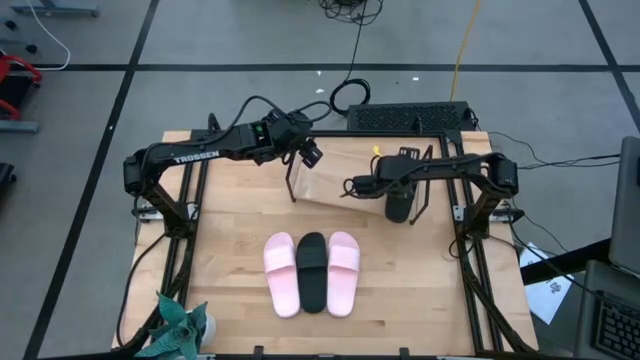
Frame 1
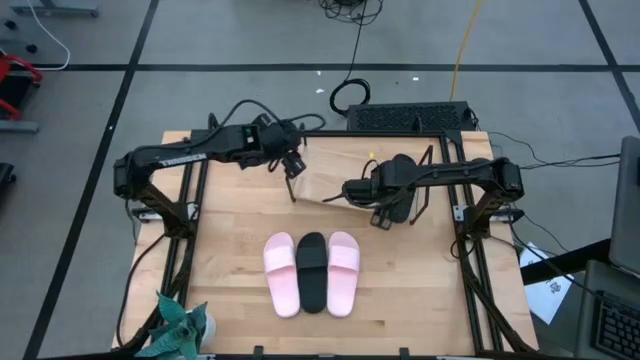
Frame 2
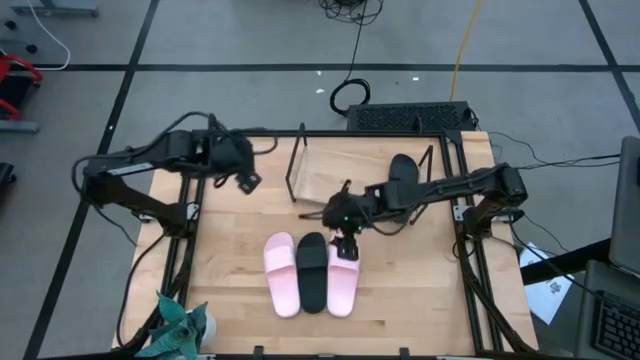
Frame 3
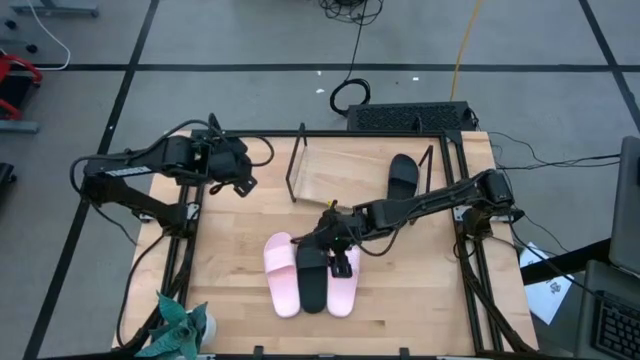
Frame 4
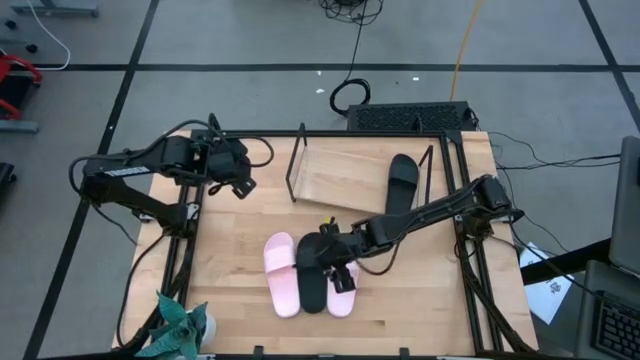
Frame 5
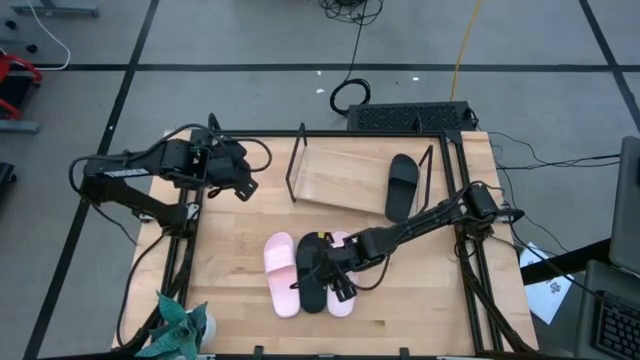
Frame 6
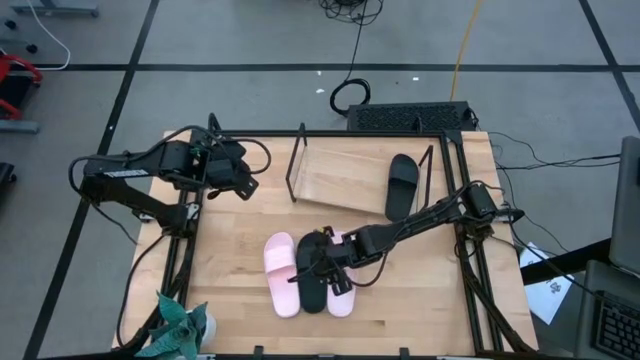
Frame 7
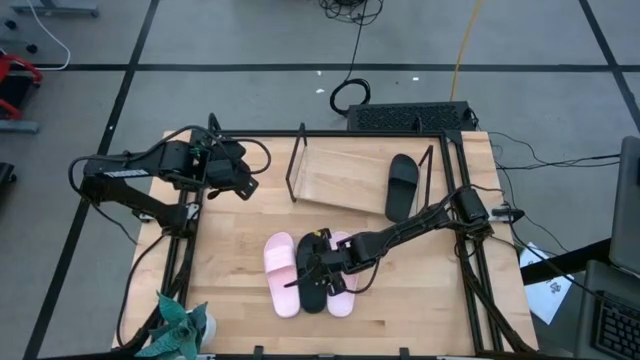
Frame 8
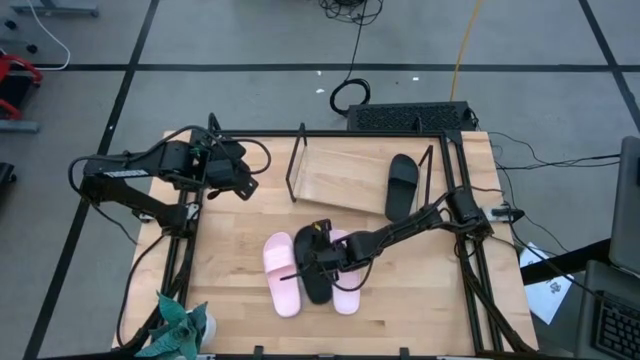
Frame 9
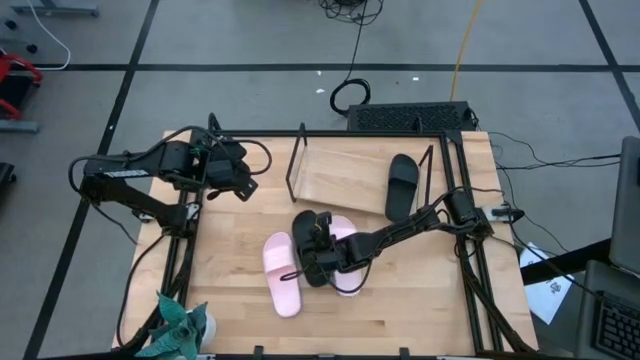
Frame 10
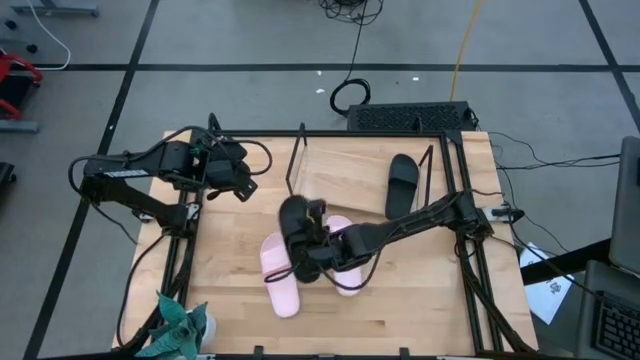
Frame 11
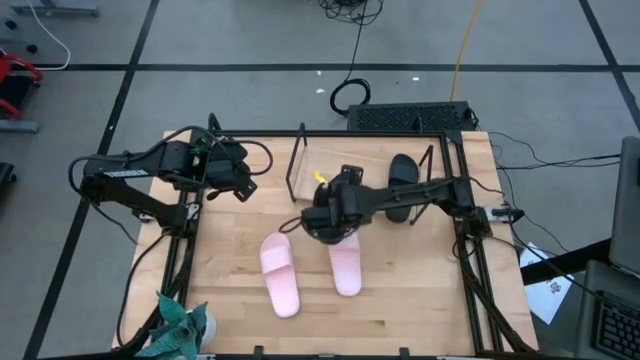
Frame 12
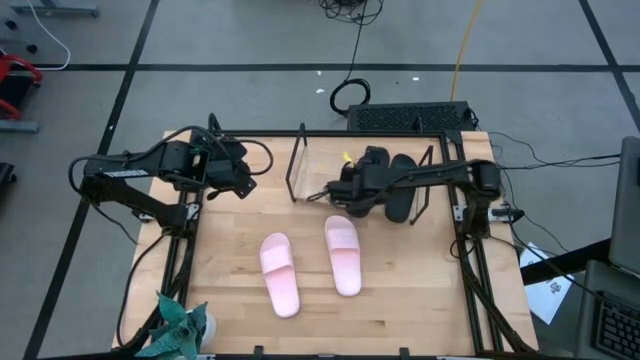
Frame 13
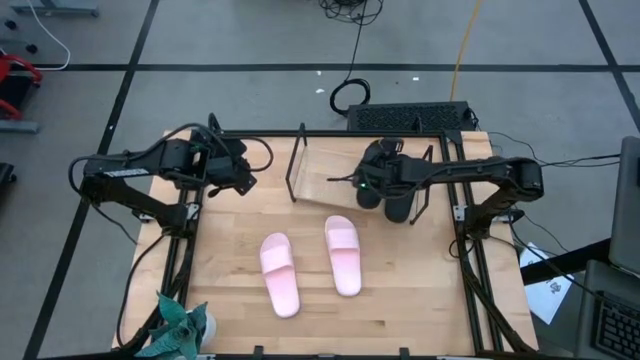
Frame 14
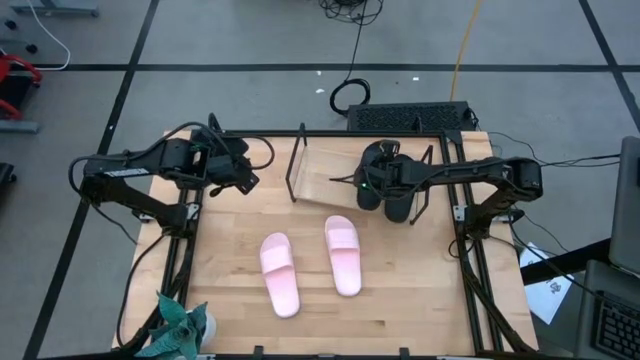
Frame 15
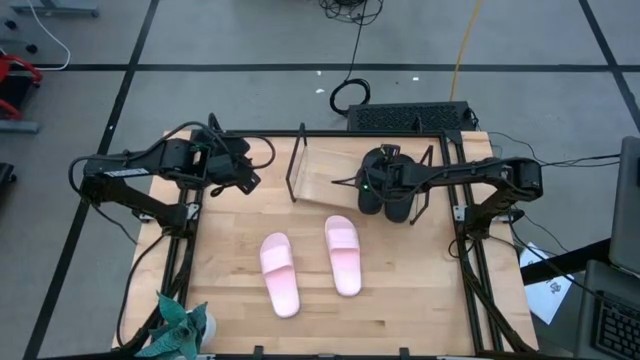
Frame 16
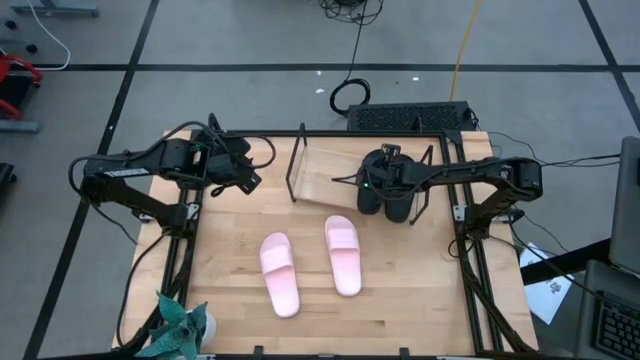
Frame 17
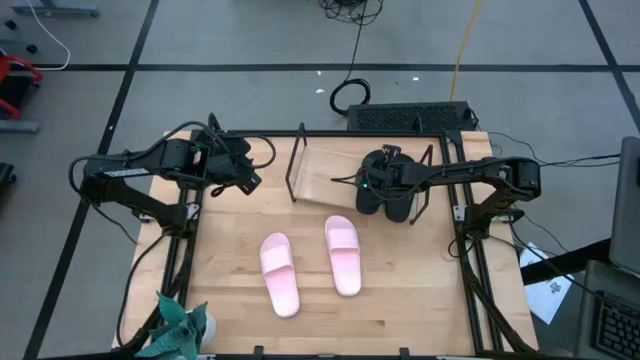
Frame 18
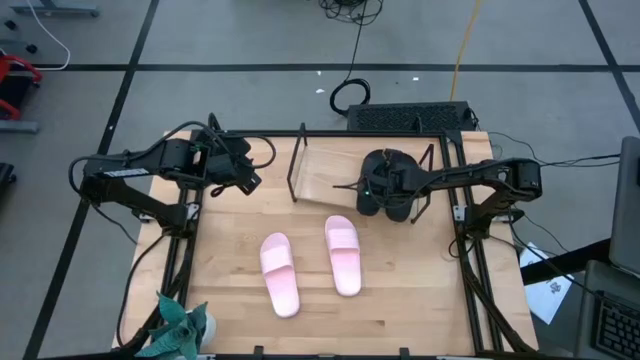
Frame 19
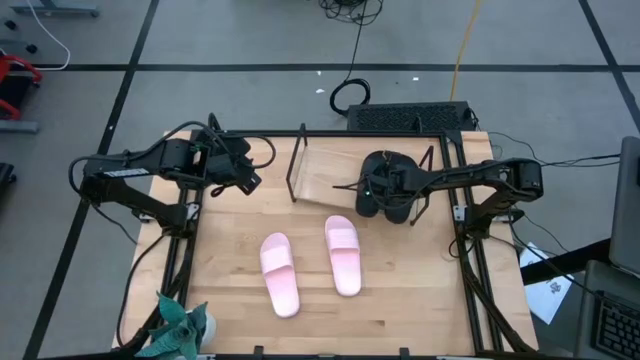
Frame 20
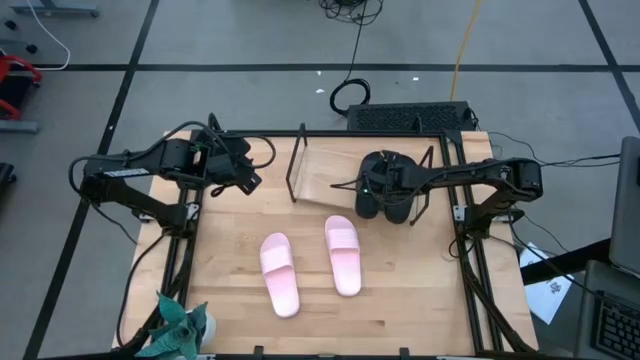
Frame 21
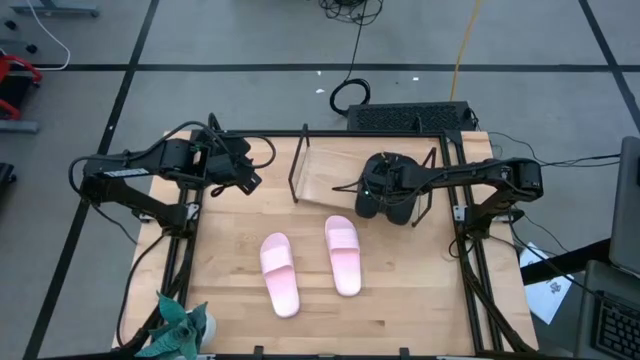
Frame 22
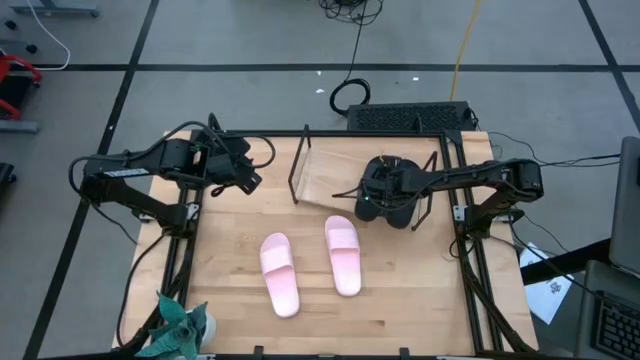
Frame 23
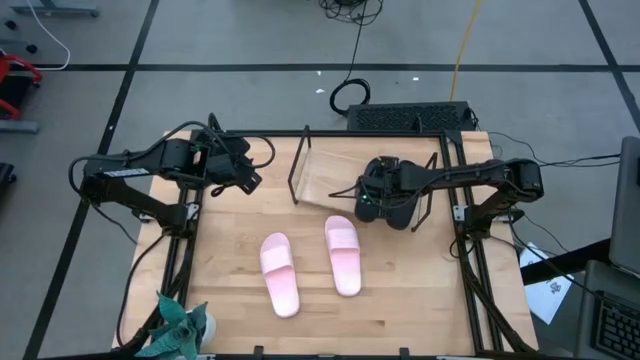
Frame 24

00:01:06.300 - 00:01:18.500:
Task: Pick and place slides into the shelf
Put the black slide on the shelf

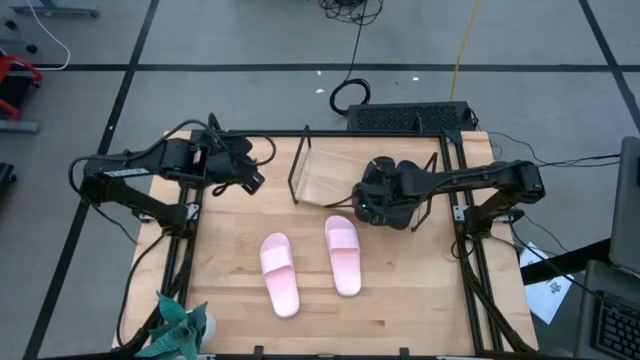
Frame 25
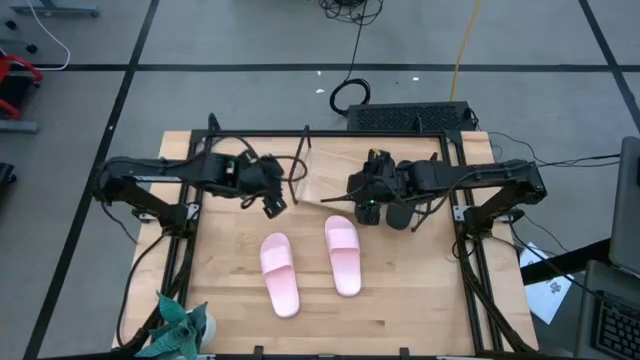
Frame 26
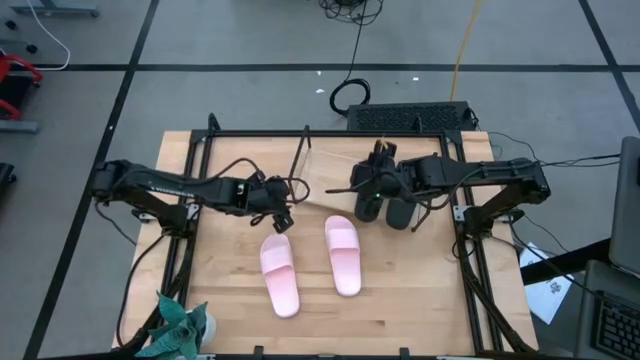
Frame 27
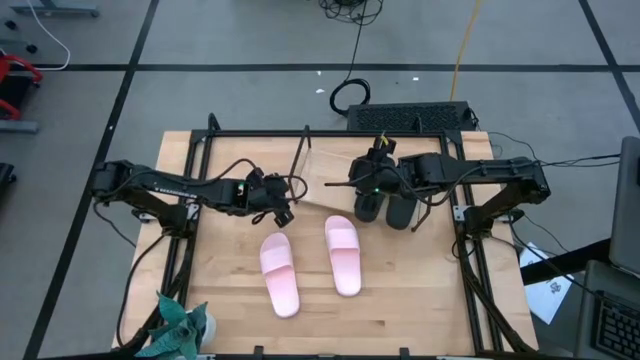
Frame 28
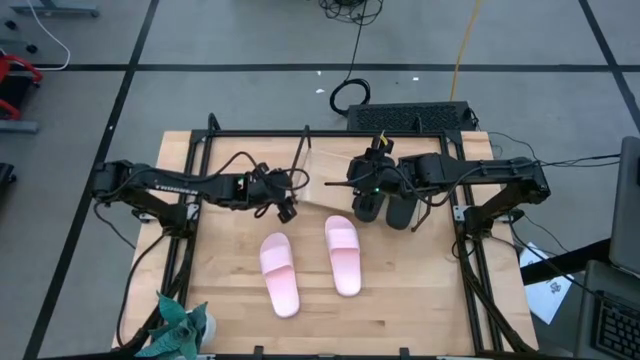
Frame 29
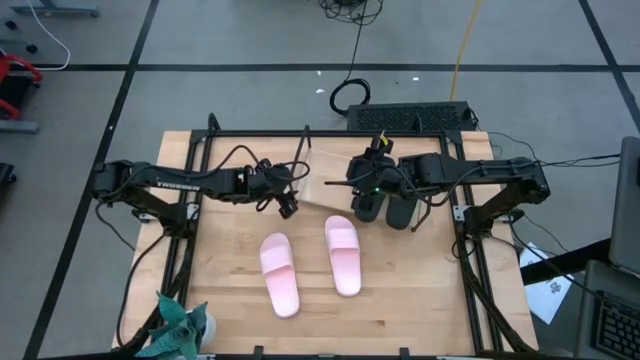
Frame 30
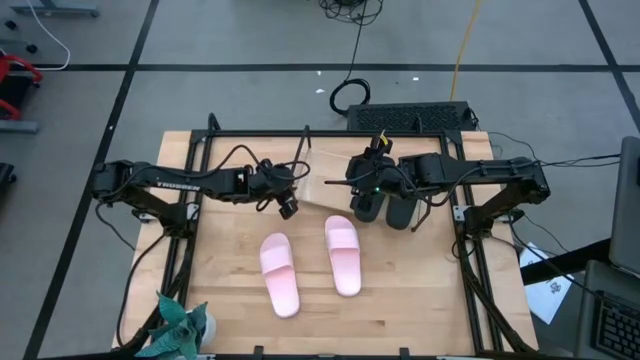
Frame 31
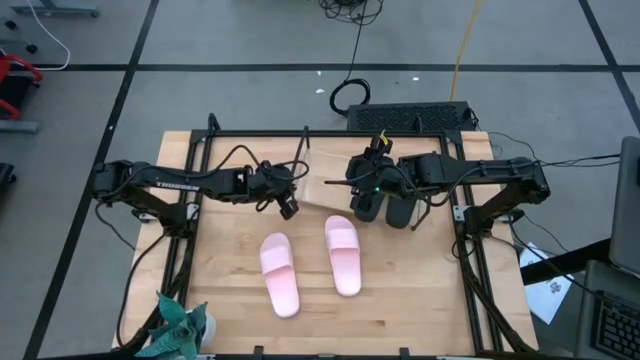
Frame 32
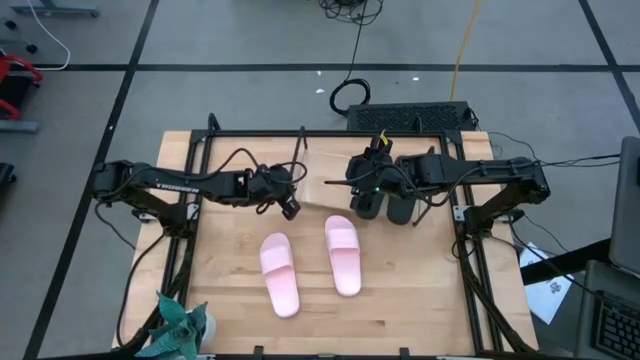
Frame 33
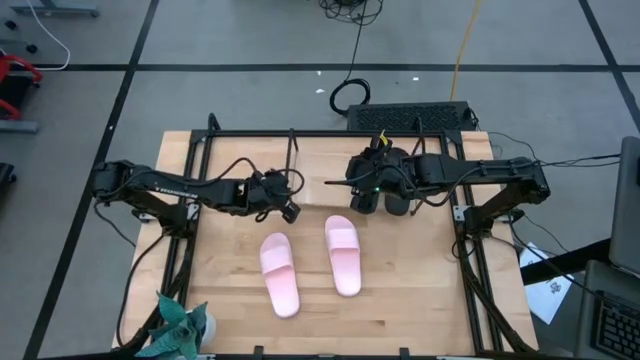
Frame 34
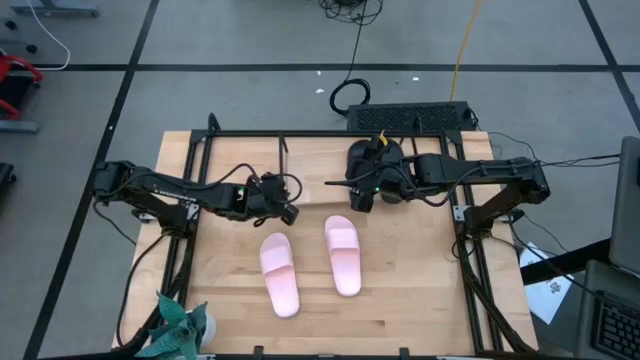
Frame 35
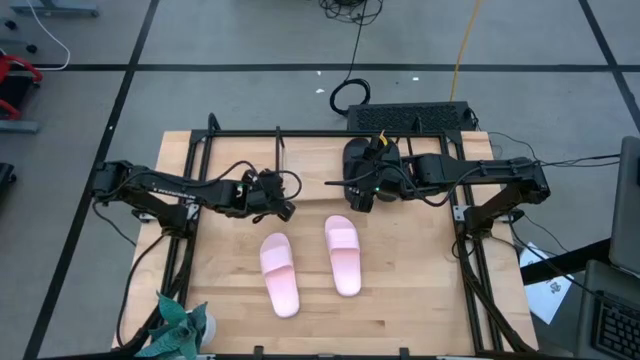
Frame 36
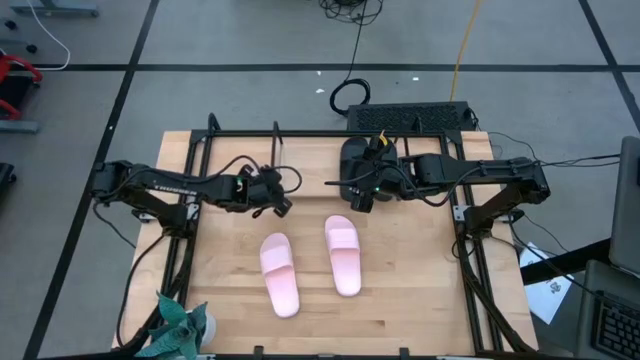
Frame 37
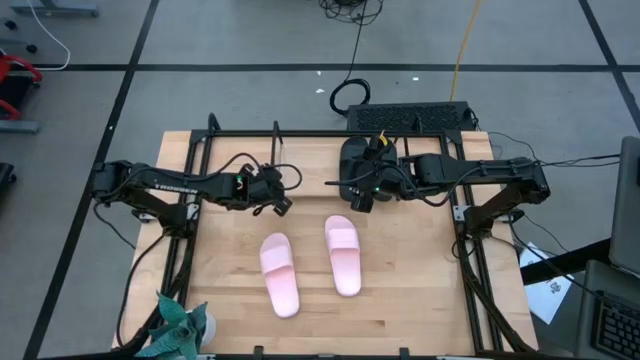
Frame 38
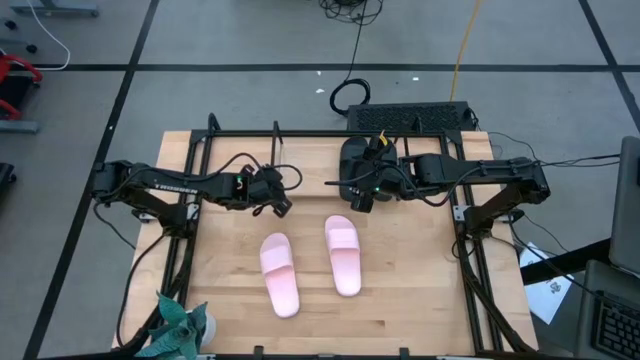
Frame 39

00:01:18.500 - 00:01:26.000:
Adjust the shelf

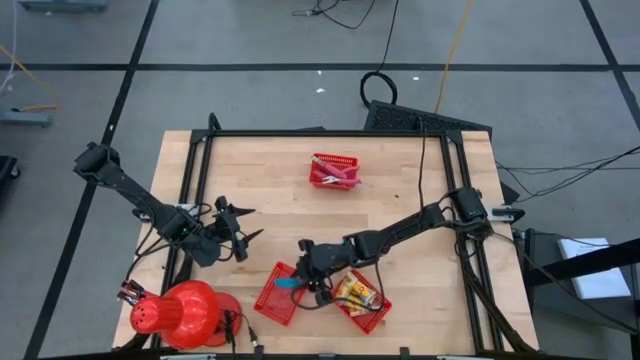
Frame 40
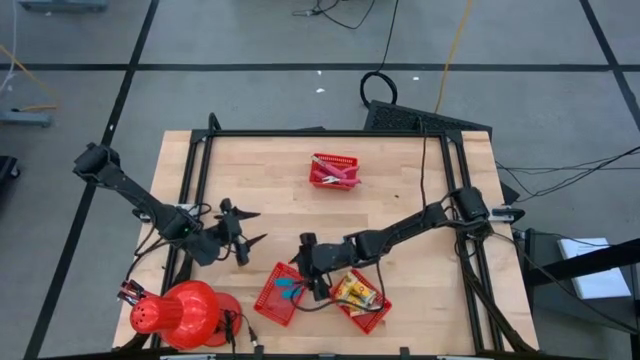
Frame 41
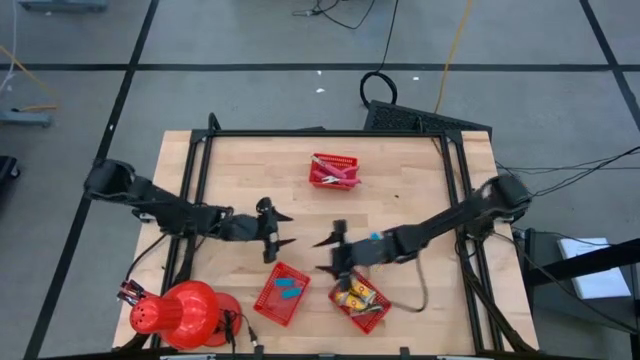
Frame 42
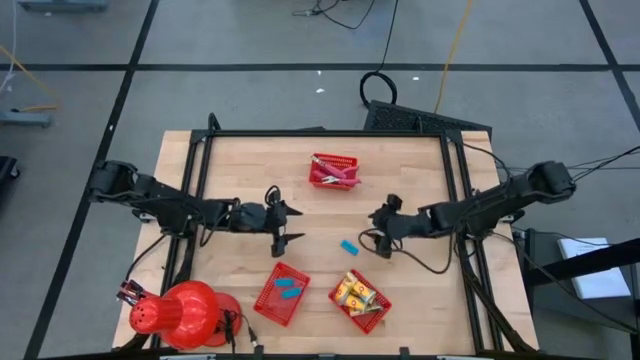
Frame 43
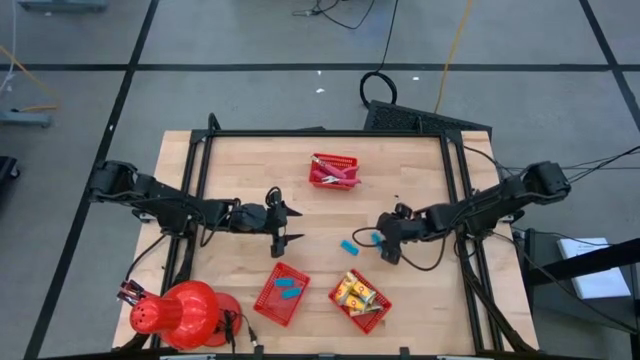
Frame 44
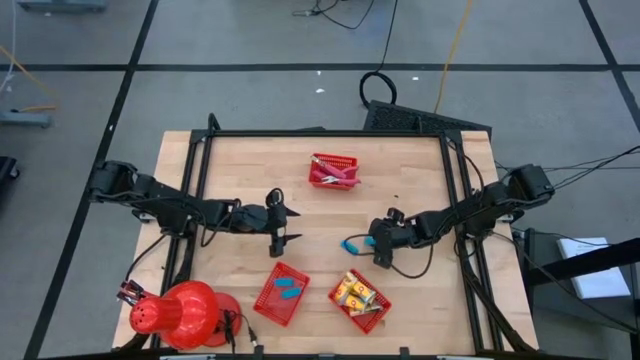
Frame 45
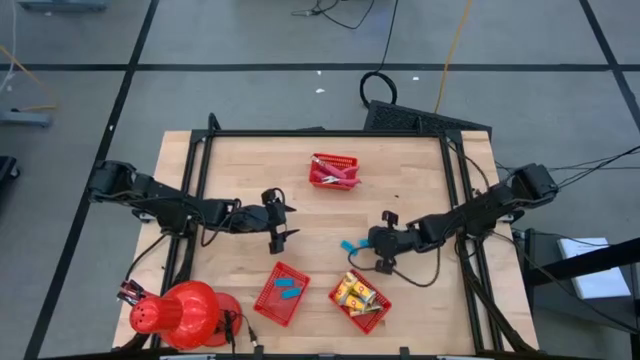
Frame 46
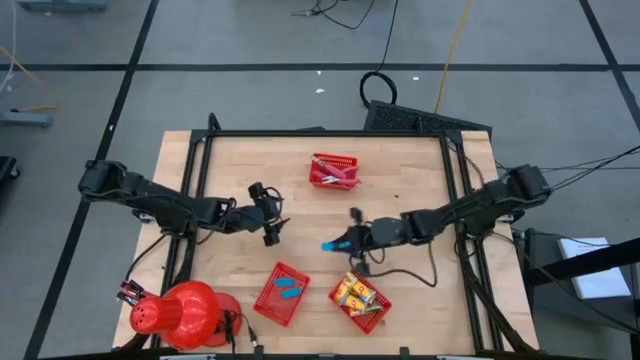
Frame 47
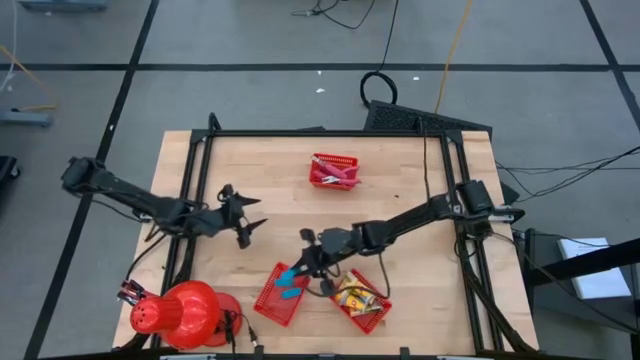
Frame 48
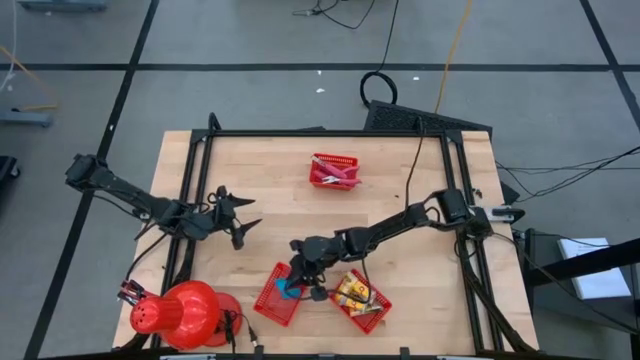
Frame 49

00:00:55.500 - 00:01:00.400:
Task: Pick & Place School Supplies
Put the blue eraser into the bottom left red basket
